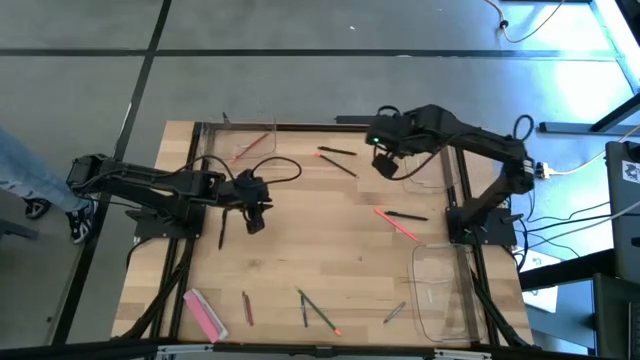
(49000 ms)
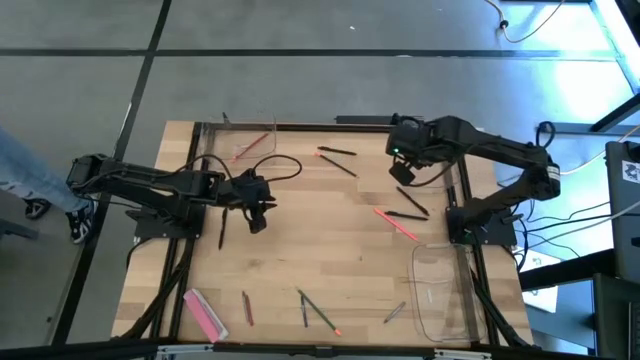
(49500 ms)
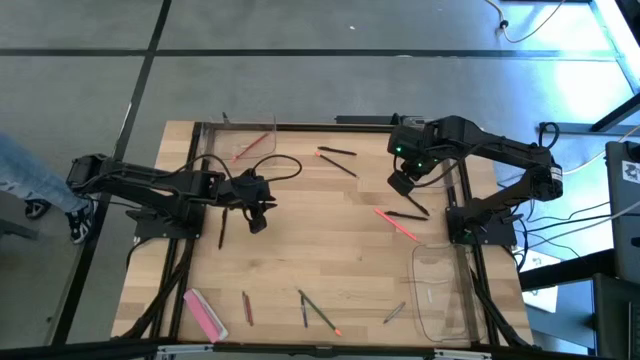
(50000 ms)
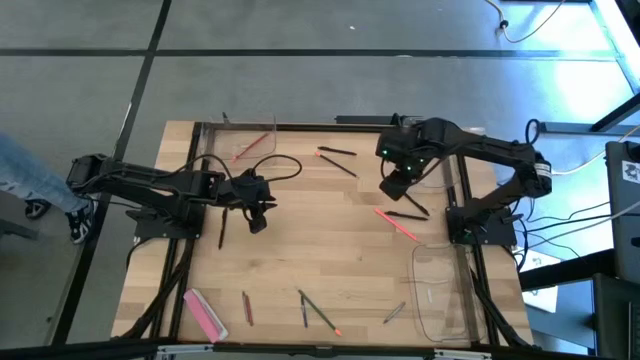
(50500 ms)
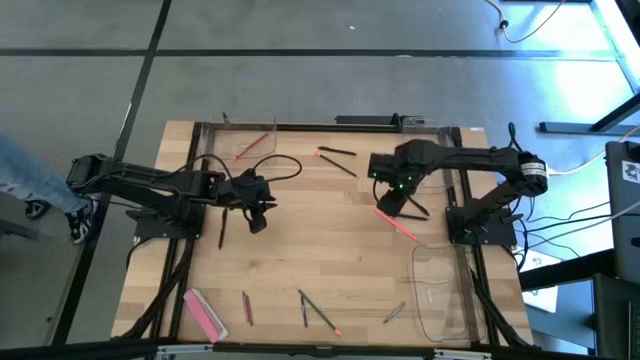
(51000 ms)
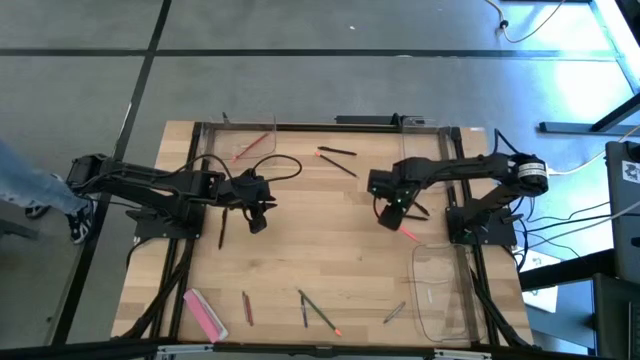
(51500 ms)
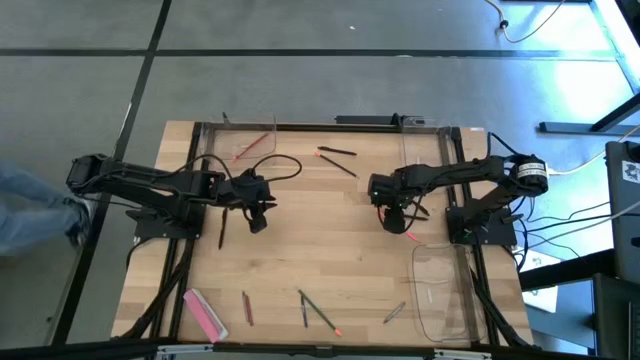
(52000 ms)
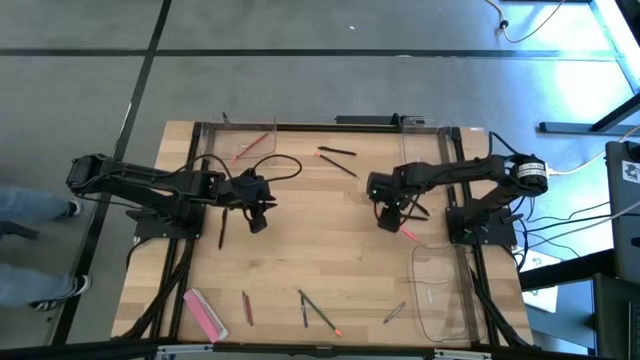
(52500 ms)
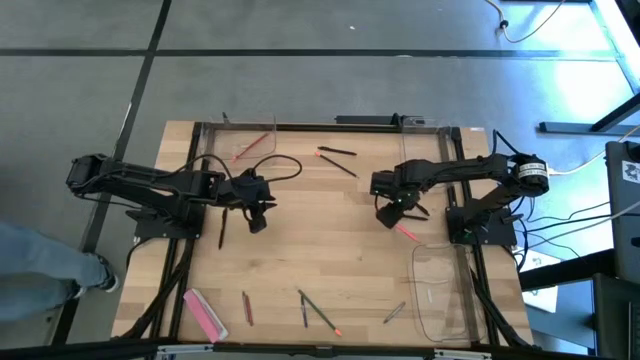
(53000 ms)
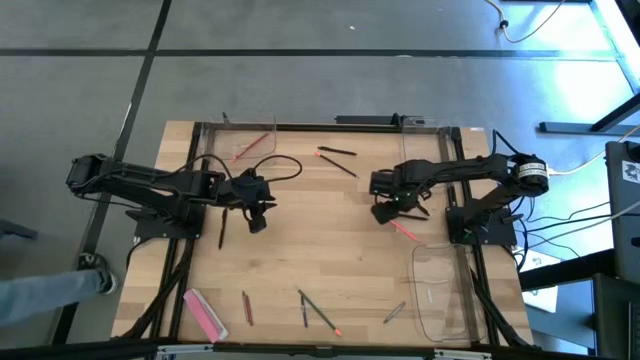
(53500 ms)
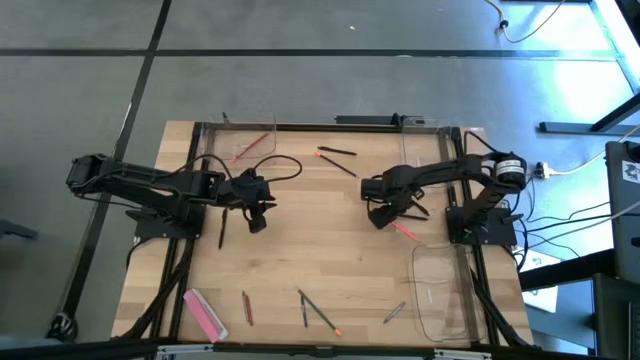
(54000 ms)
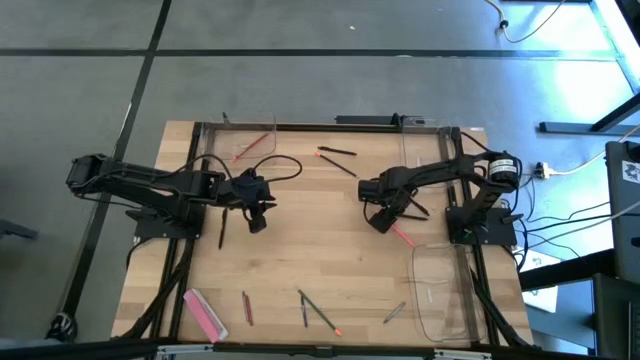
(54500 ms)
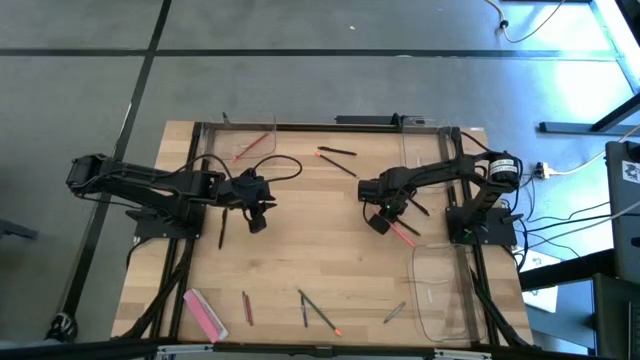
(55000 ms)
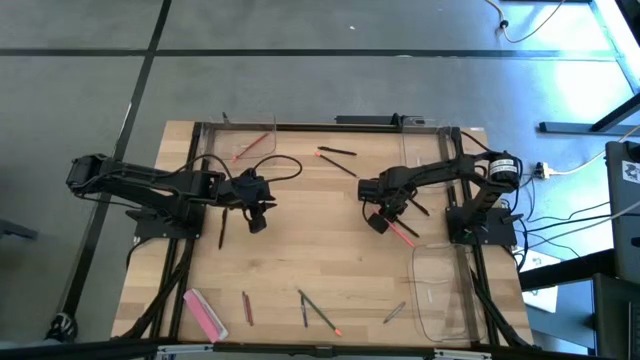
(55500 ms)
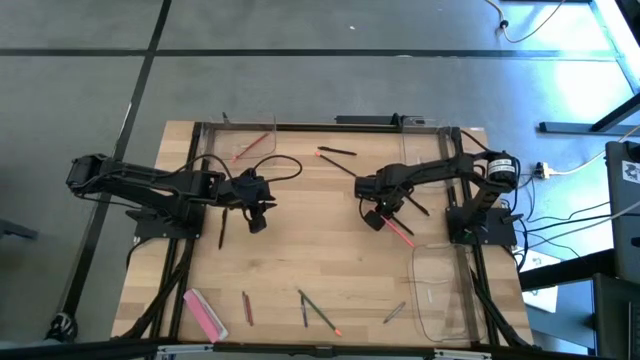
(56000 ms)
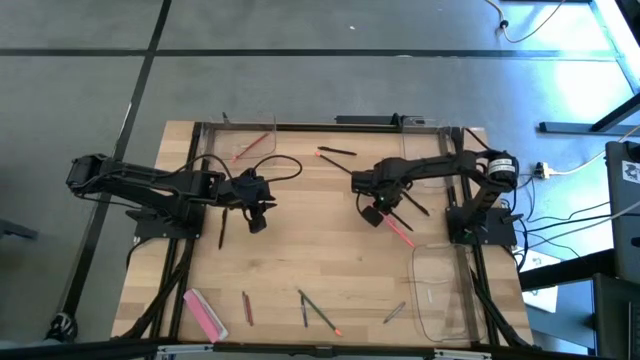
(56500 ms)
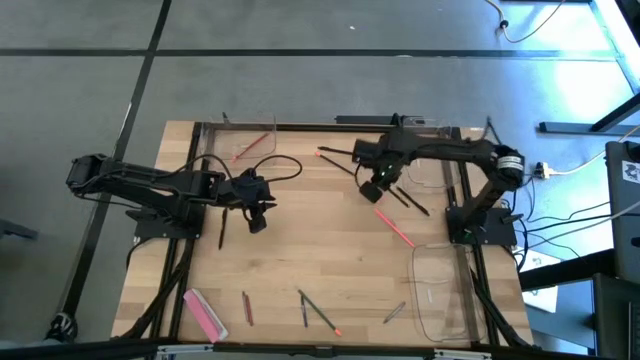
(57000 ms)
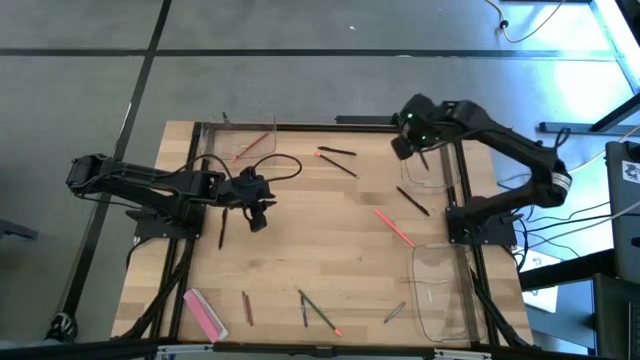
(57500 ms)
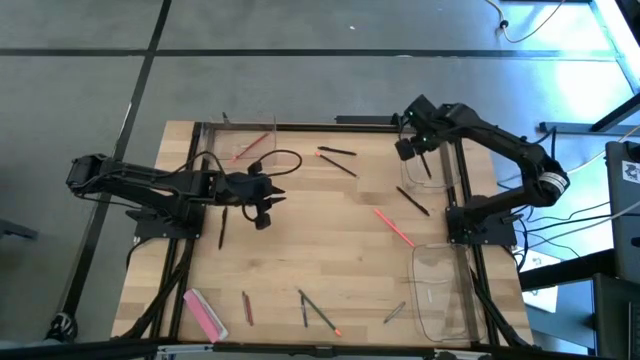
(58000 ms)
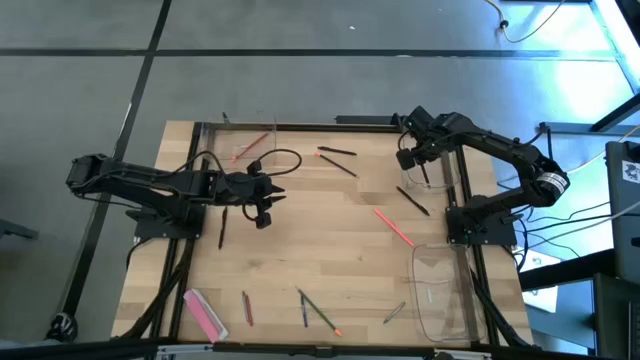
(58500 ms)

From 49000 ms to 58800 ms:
Task: Sort crayons/erasers/pens/pencils in bins
Put the black pen into top right transparent bin

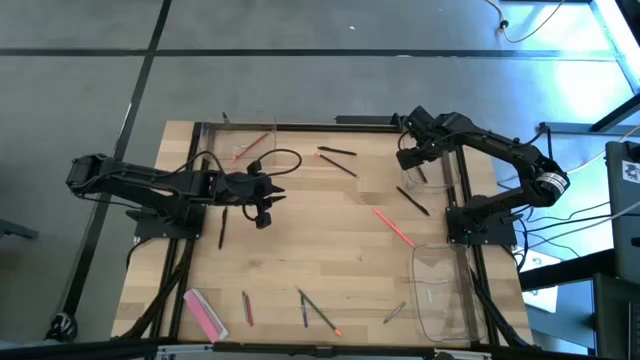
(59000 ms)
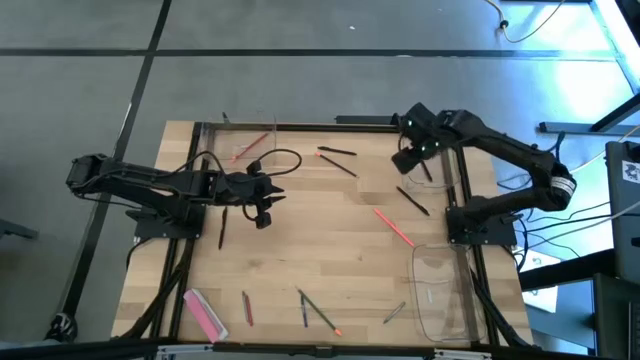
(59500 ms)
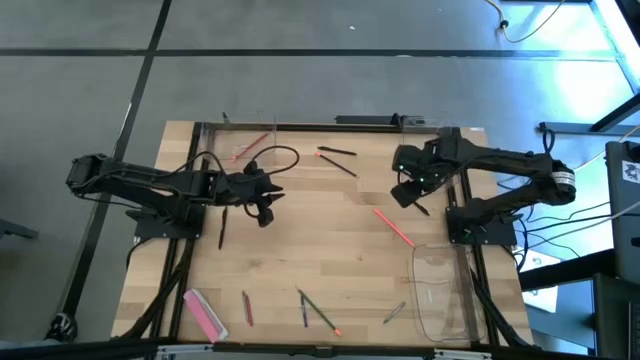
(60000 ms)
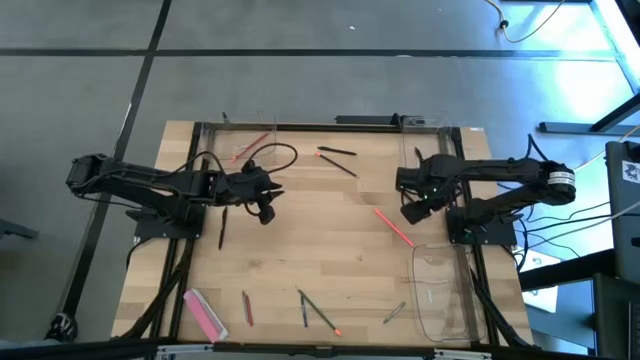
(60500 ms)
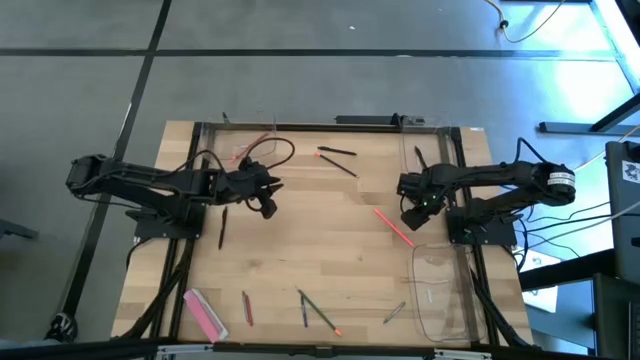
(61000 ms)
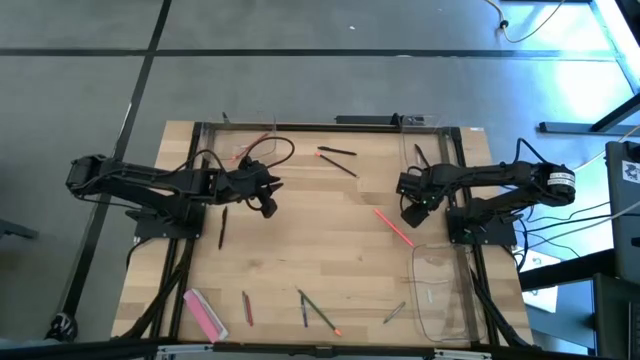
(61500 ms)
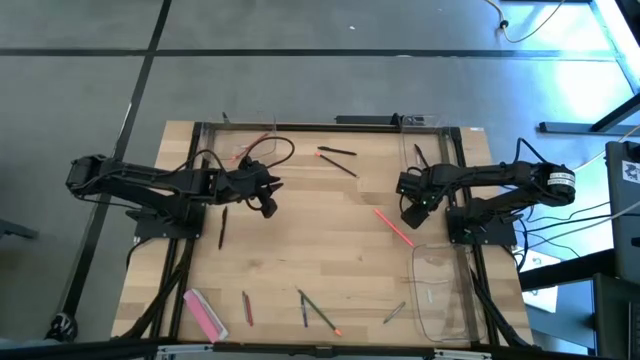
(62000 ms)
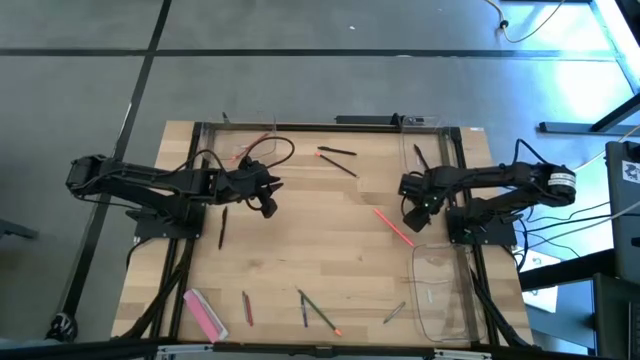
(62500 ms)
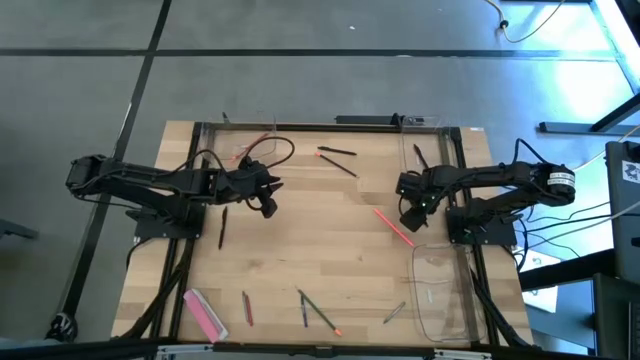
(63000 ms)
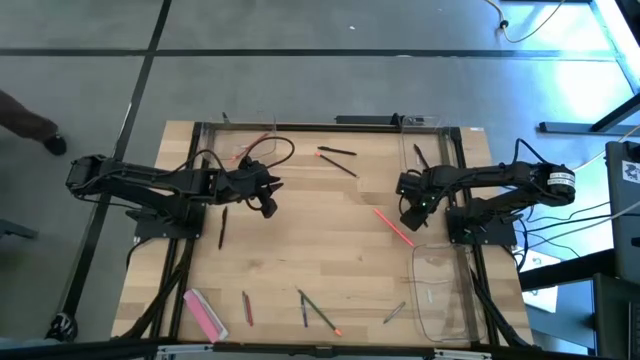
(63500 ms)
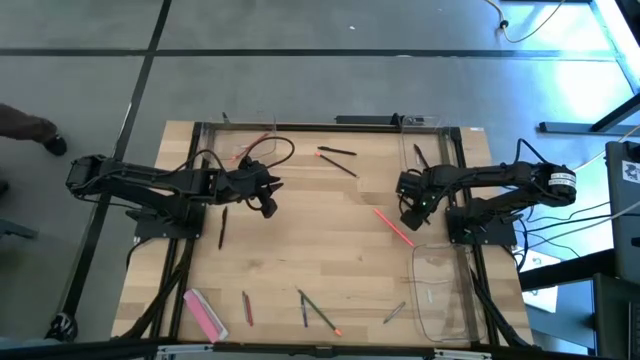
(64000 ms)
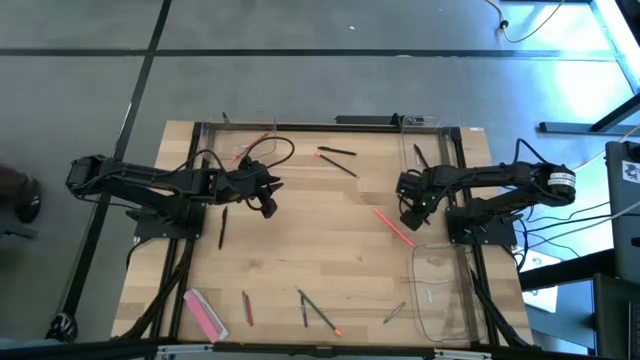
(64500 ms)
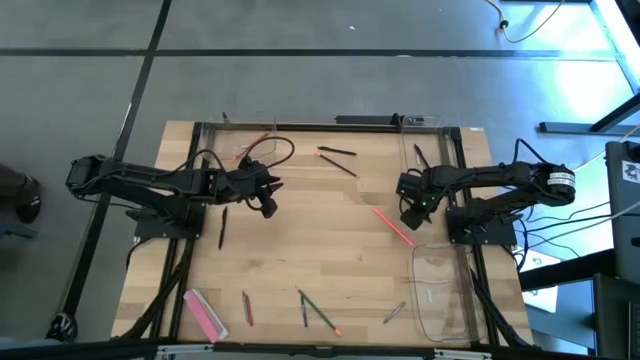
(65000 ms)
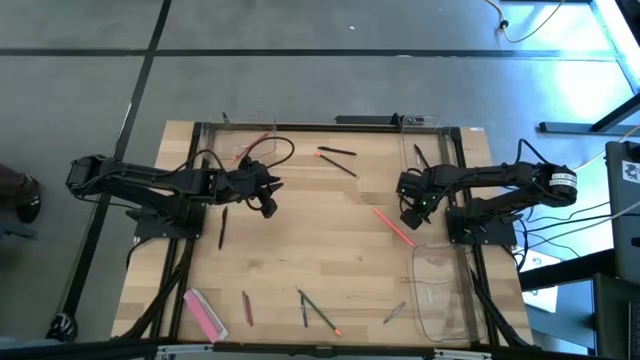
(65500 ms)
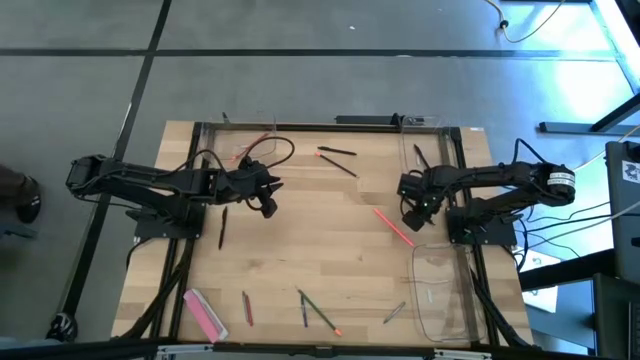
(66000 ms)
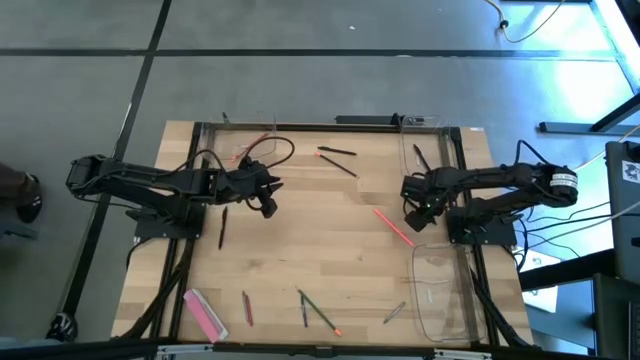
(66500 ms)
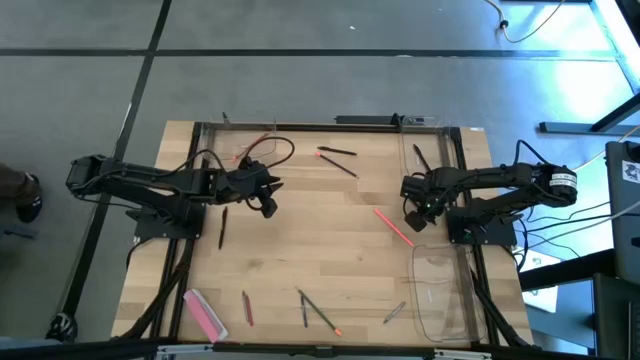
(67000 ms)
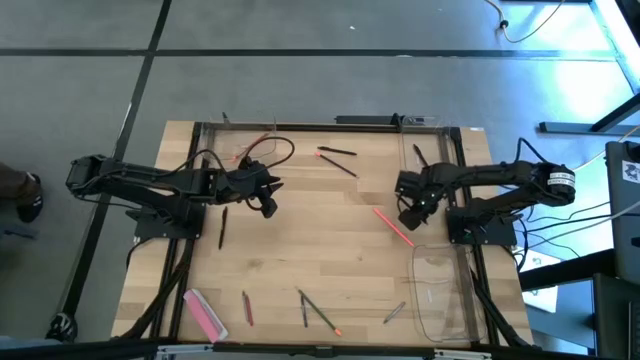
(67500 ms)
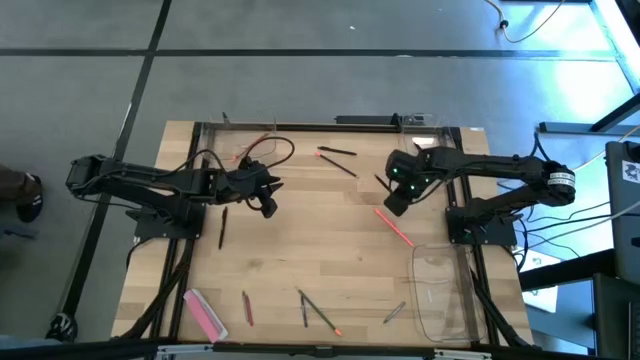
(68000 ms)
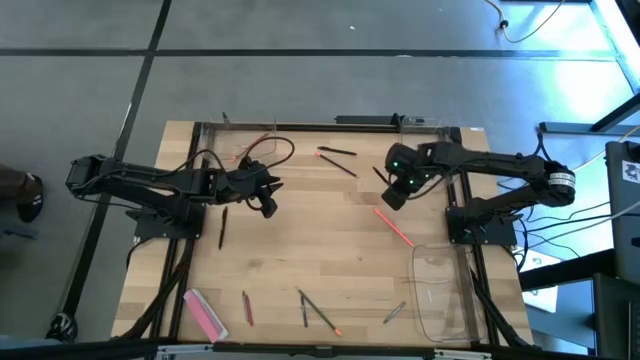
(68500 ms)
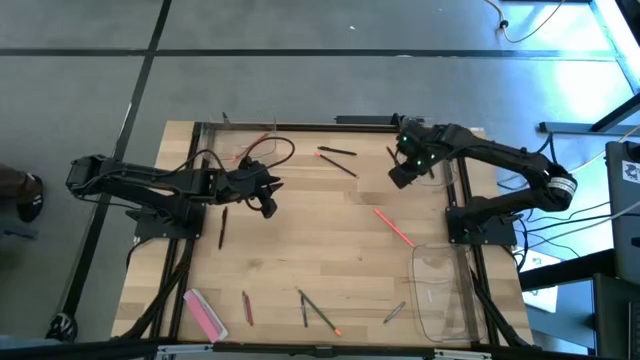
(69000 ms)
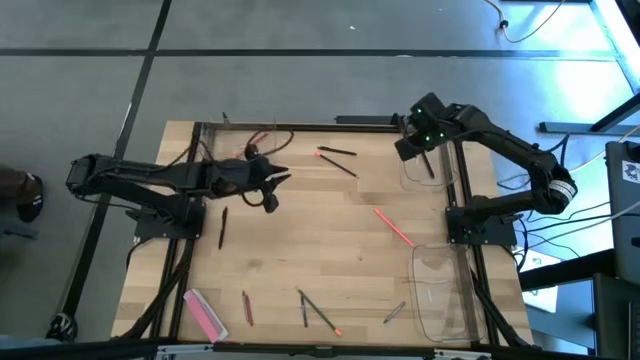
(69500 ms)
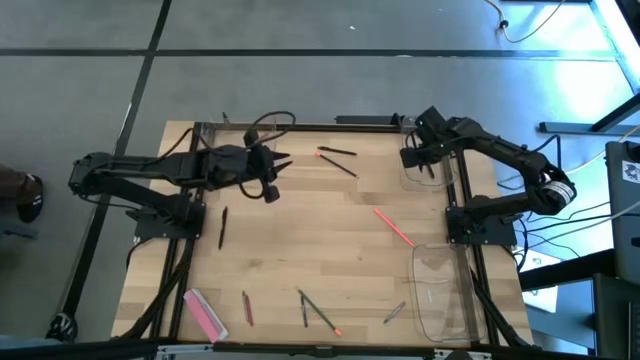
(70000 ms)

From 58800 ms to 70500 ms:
Put the black pen into the top right transparent bin
